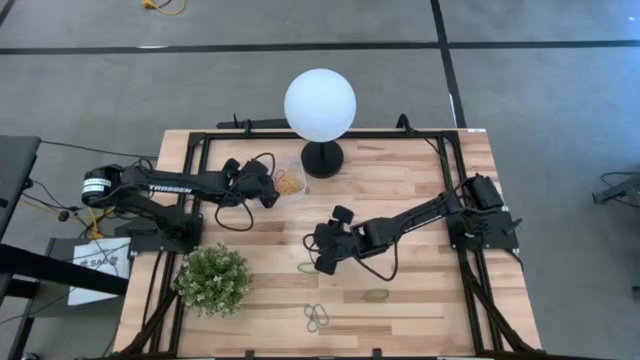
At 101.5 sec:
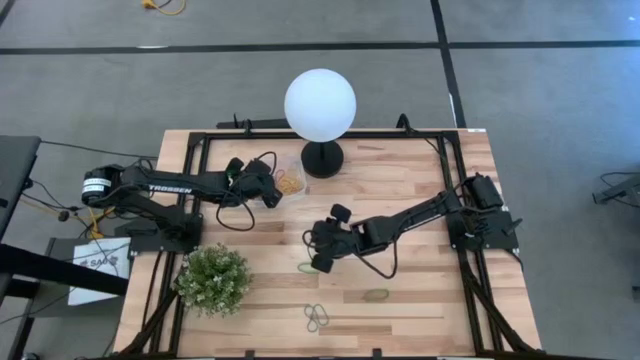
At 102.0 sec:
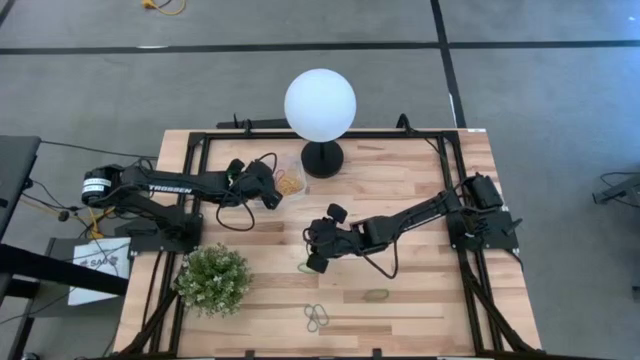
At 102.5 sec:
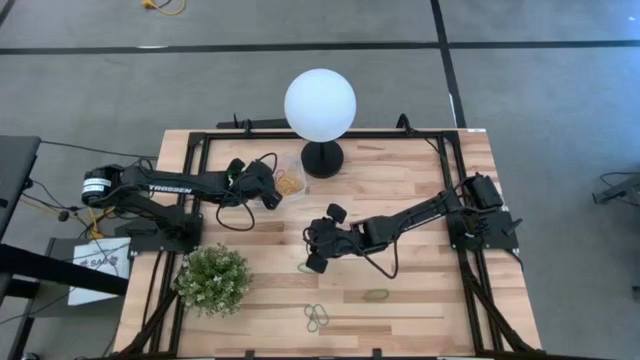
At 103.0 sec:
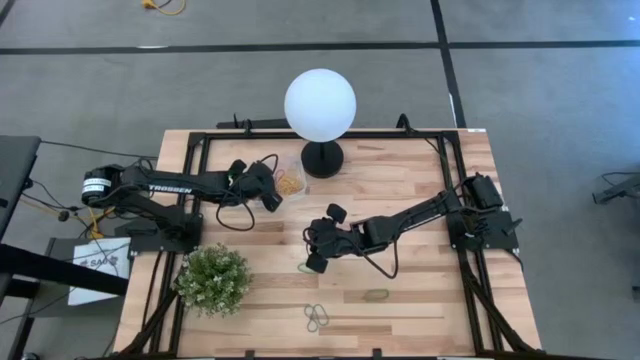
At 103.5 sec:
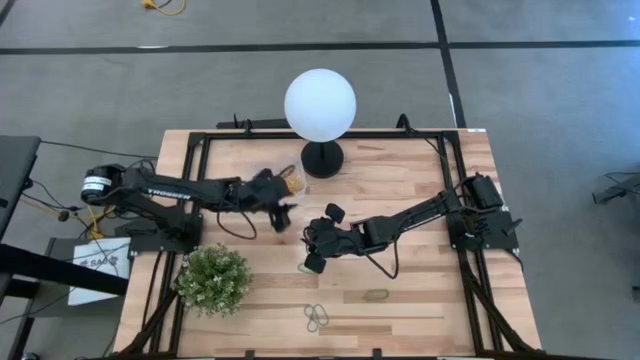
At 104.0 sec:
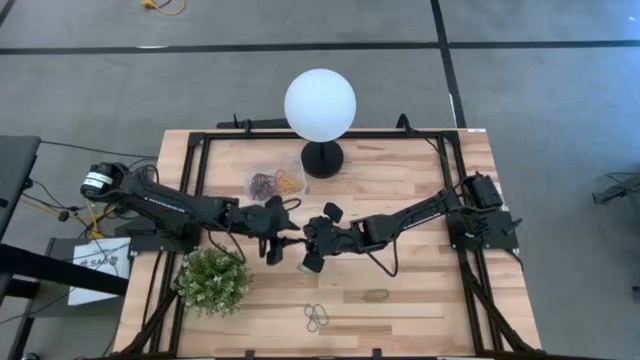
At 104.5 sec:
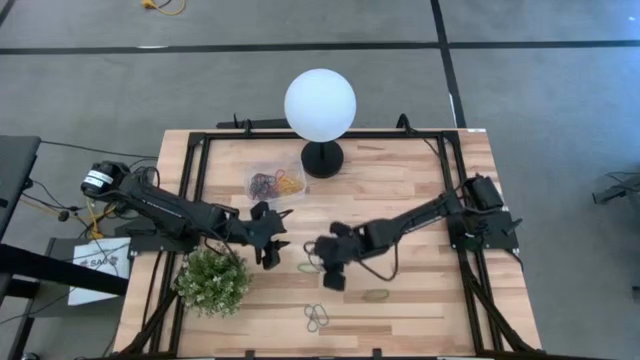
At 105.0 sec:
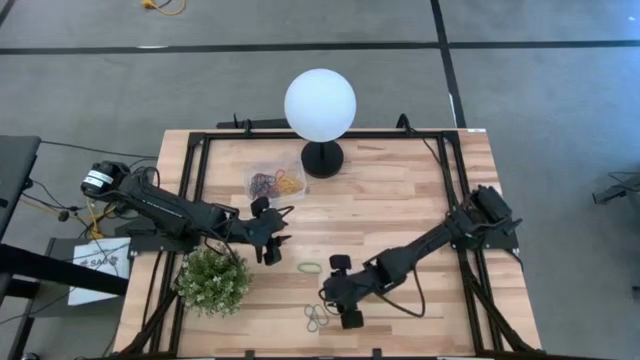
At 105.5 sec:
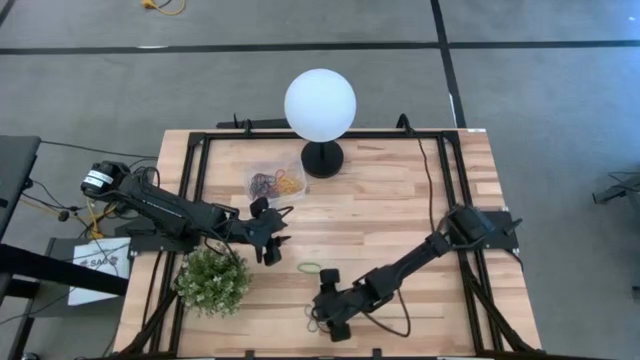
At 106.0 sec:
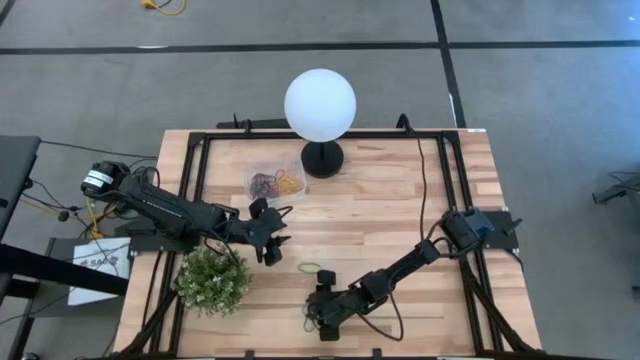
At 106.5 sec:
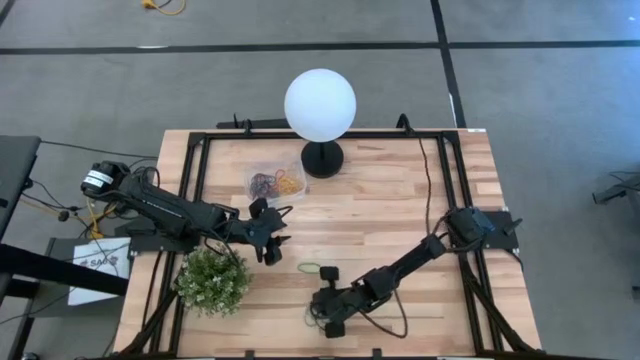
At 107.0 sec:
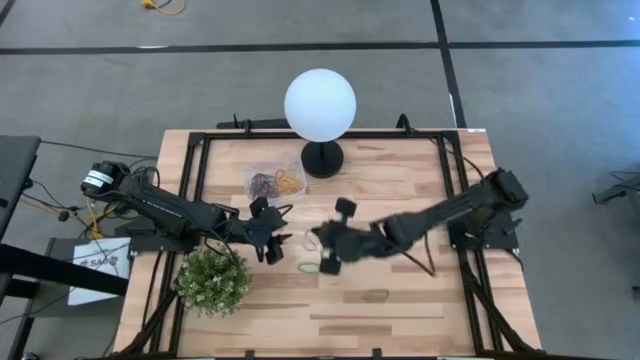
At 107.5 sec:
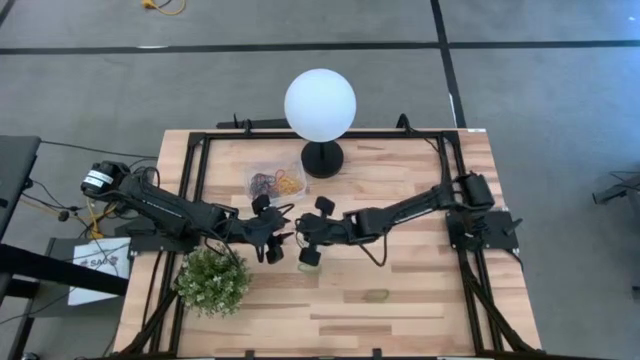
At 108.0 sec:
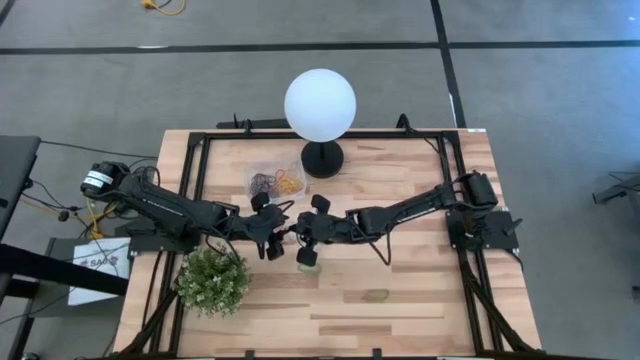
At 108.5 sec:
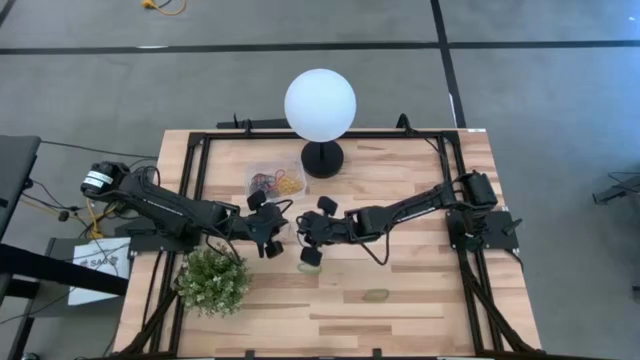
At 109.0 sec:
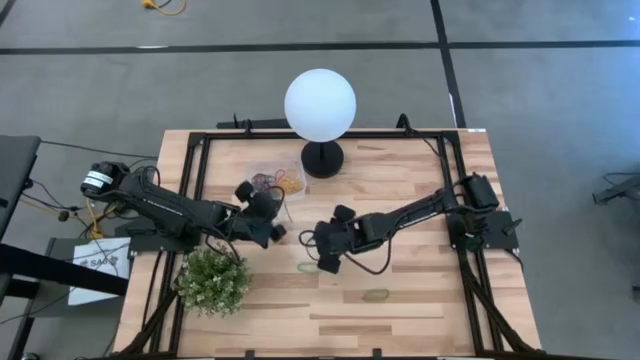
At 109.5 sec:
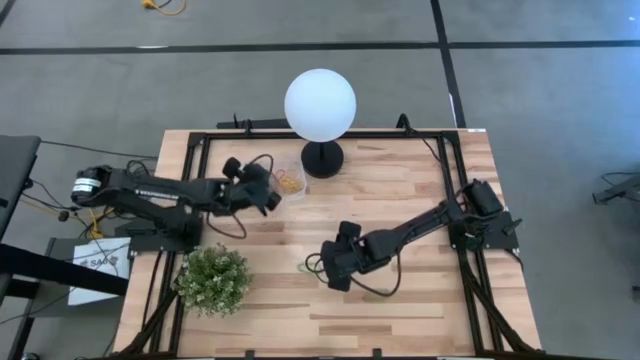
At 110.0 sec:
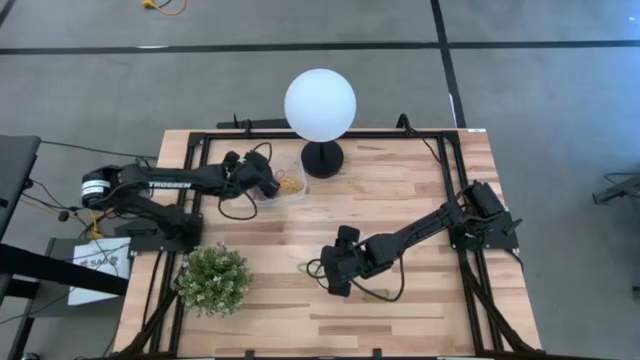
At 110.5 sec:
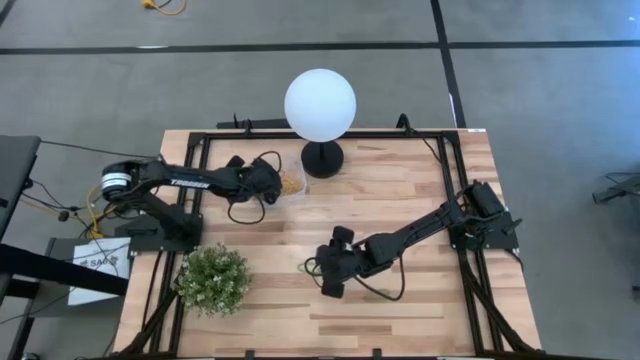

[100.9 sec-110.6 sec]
Task: Pick and place items into bin
Put the blue rubber band into the transparent bin

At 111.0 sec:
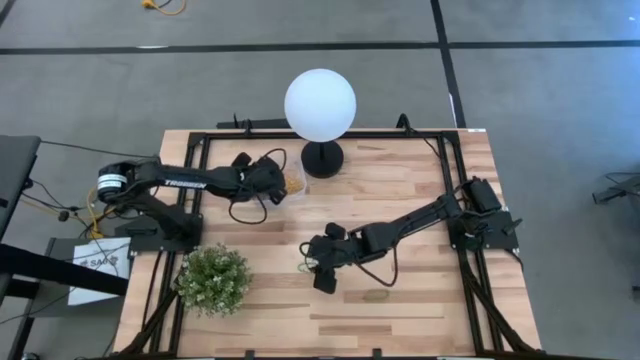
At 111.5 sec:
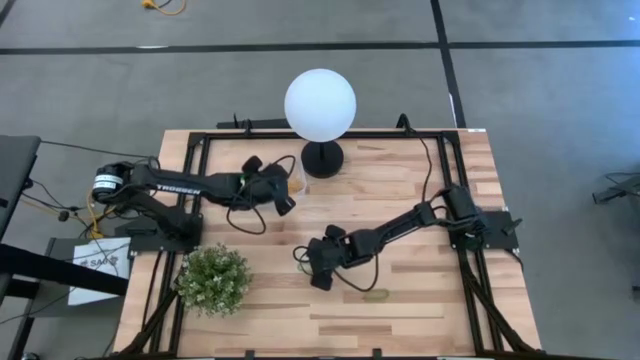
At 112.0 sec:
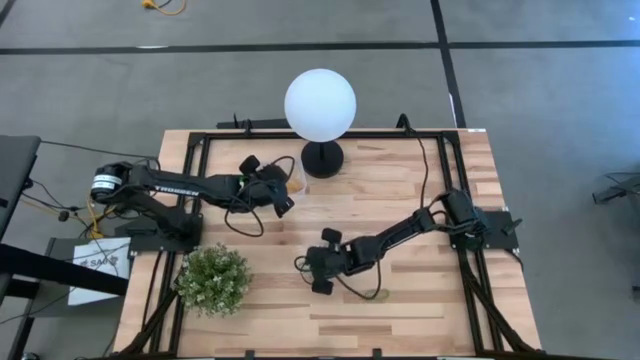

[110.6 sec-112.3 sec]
Put the green rubber band into the transparent bin

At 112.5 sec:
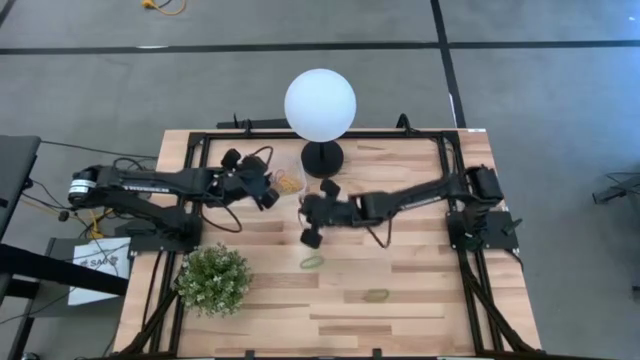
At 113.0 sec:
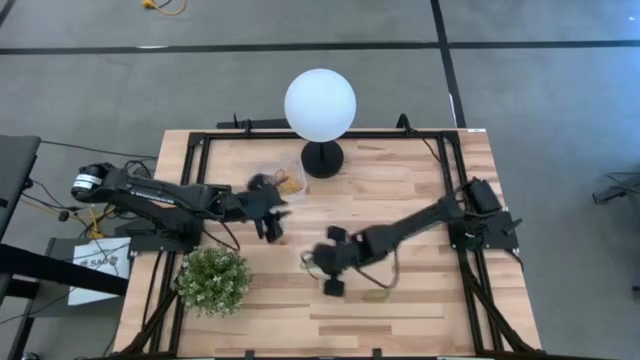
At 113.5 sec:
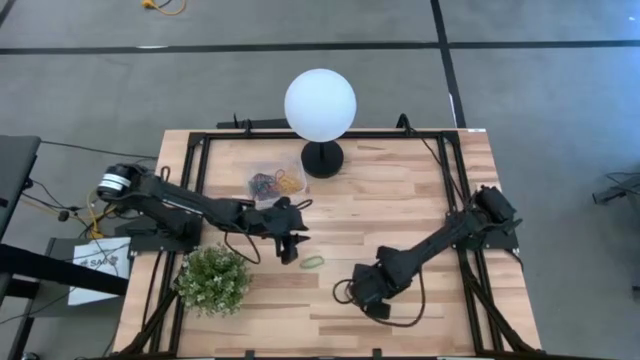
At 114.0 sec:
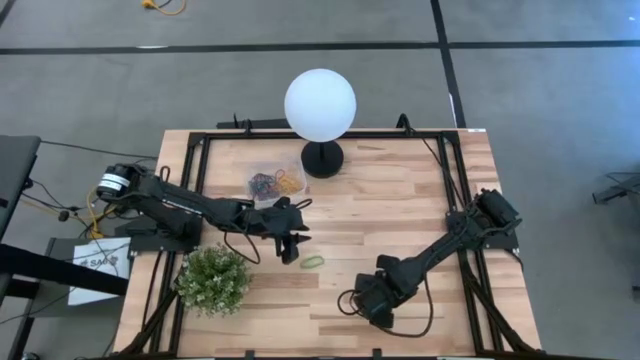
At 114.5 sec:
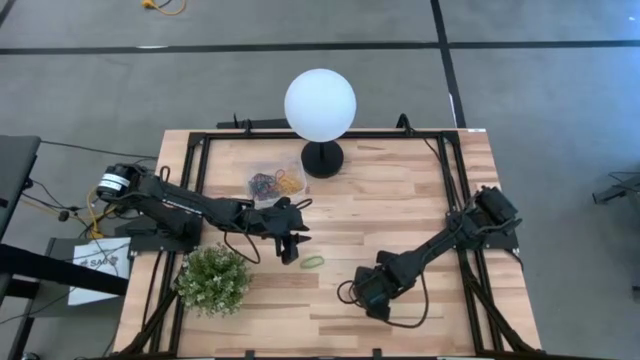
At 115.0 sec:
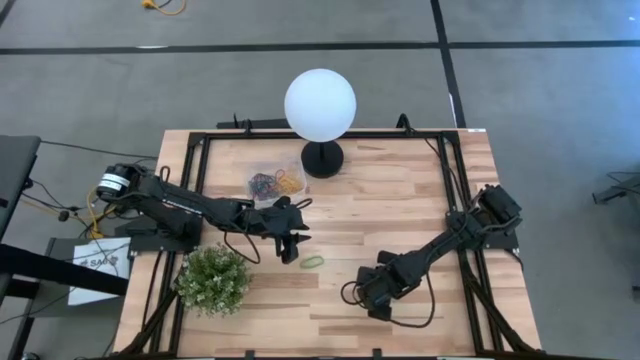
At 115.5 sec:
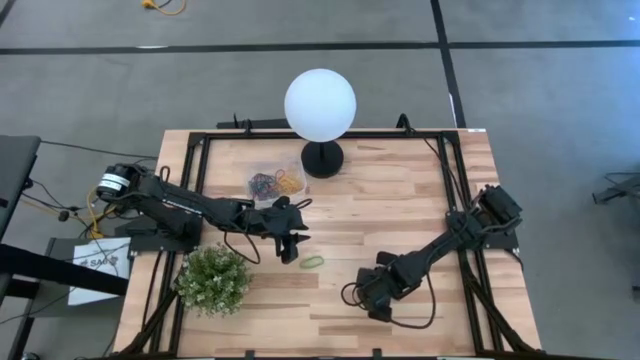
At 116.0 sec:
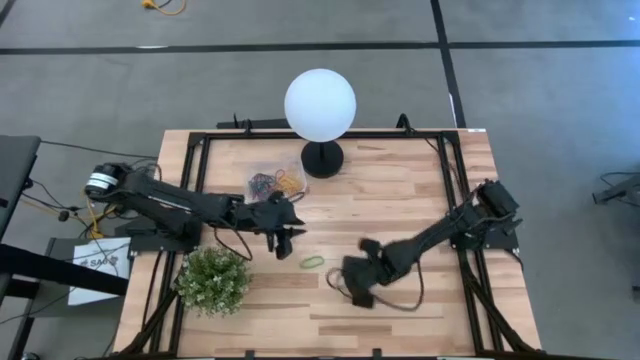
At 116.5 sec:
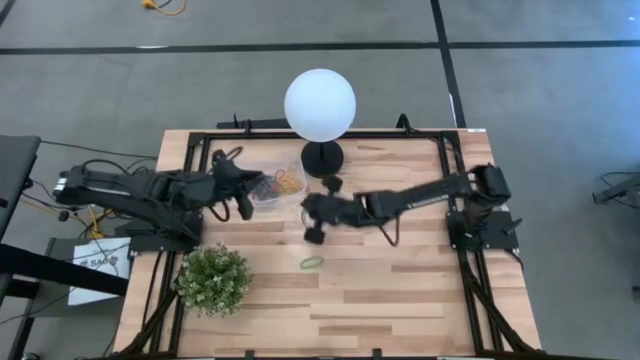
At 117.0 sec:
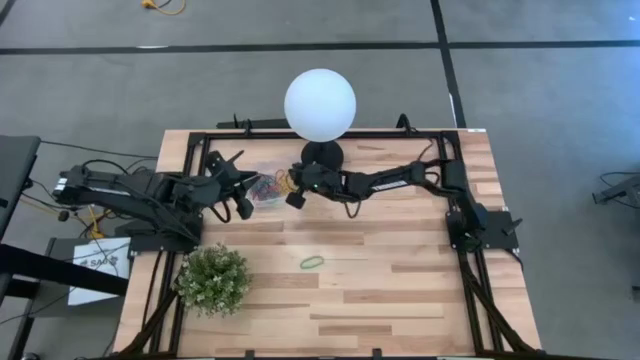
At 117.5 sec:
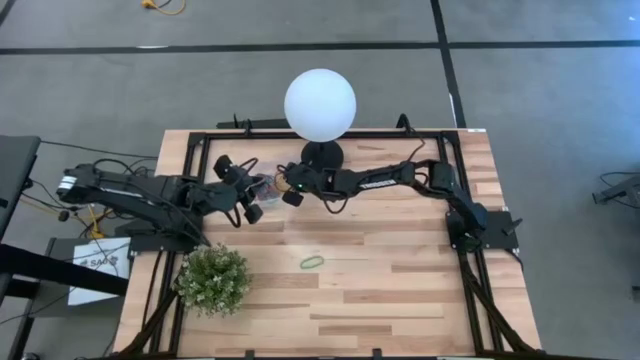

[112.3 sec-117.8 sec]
Put the green rubber band into the transparent bin

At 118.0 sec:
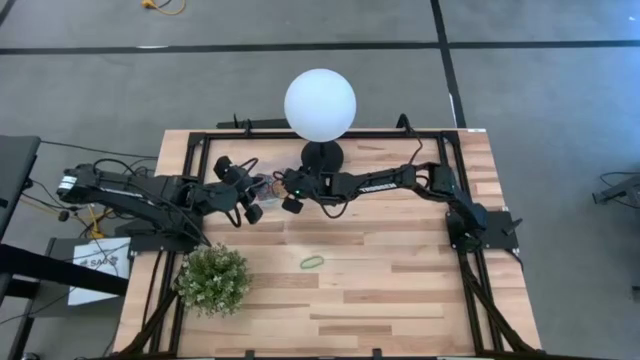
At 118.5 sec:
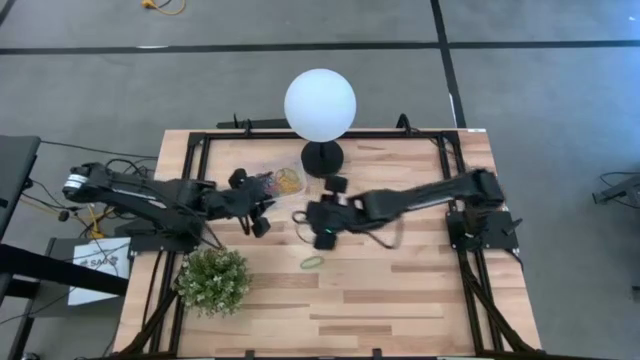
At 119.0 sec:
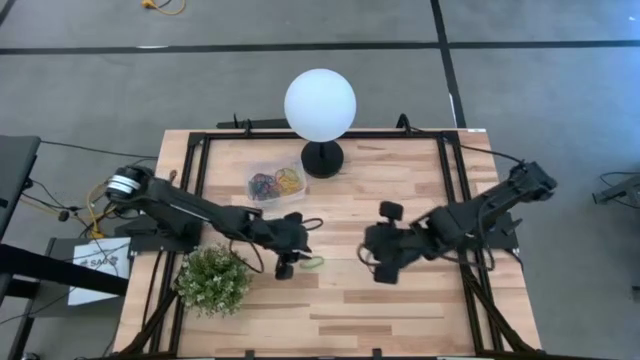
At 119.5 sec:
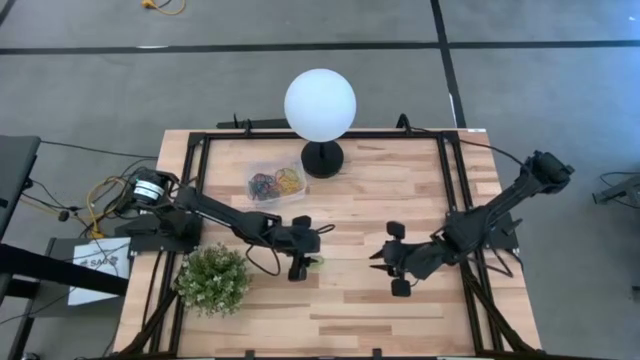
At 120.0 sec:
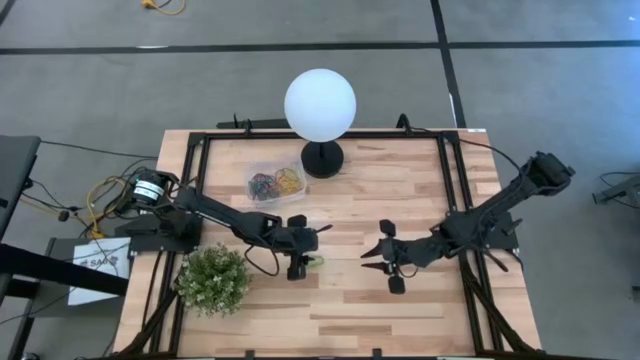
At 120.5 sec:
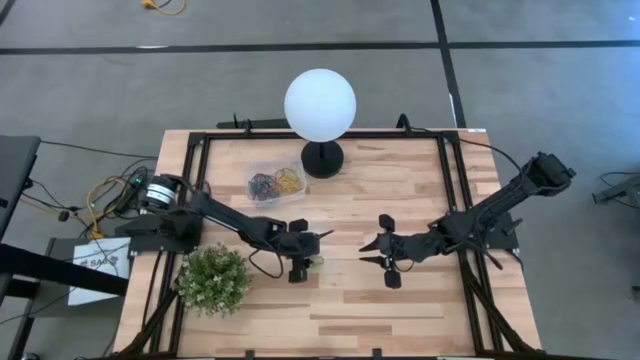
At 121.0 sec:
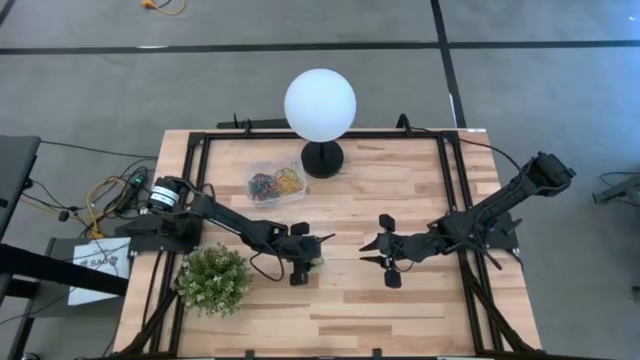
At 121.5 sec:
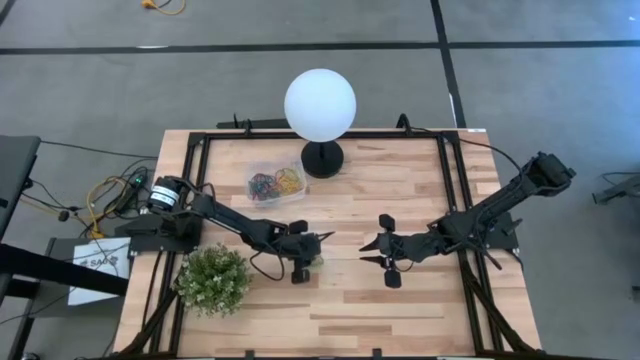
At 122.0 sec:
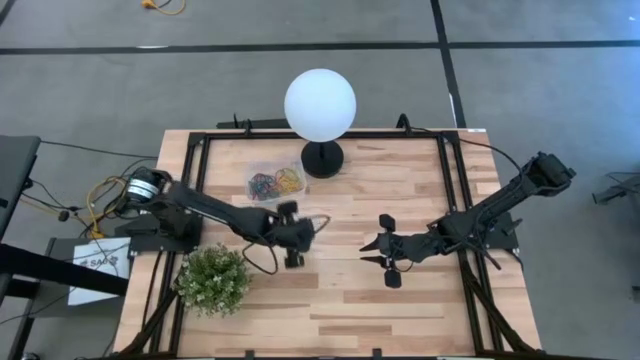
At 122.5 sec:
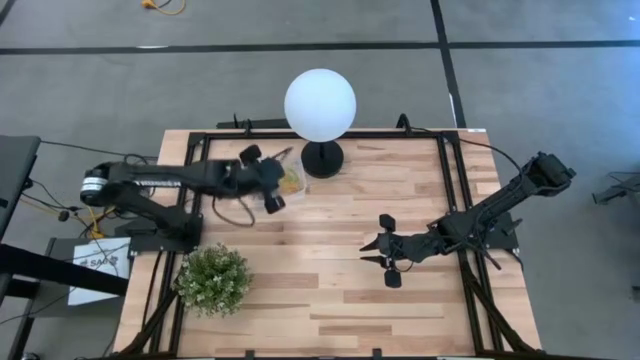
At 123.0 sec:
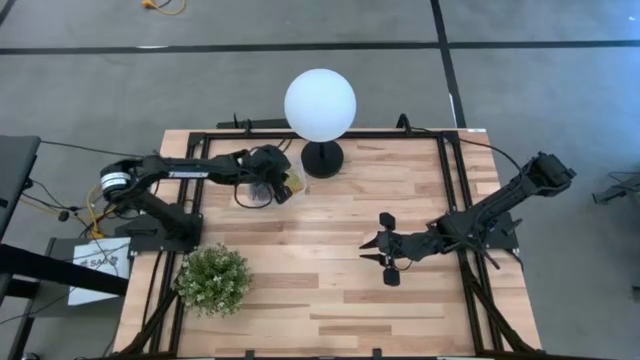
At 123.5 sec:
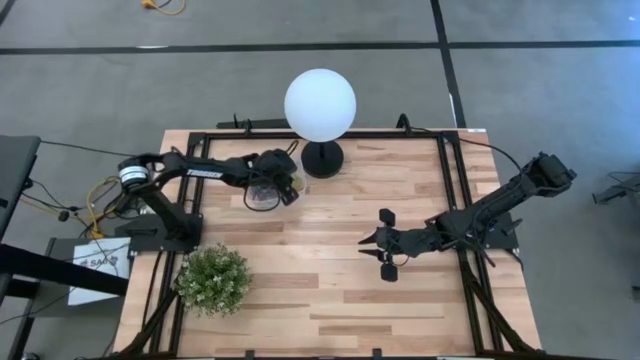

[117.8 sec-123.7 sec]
Put the green rubber band into the transparent bin
